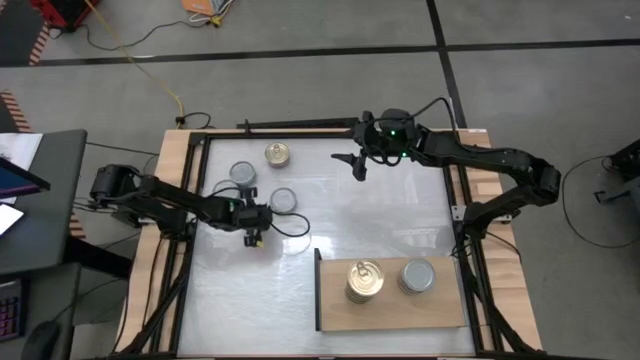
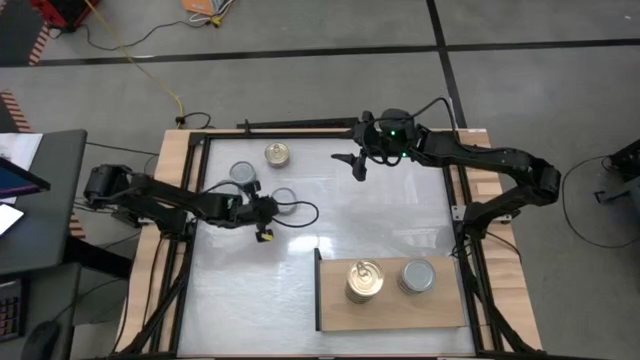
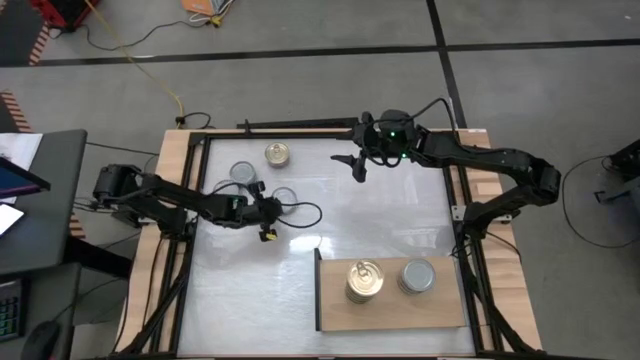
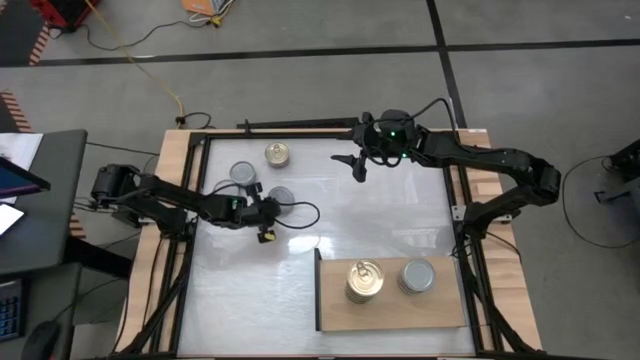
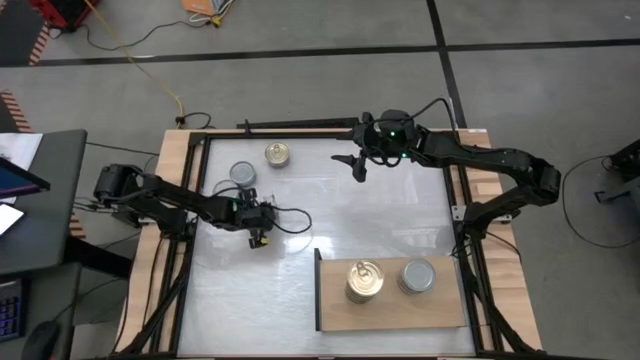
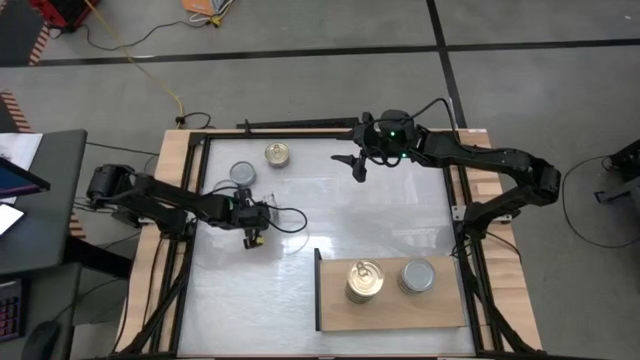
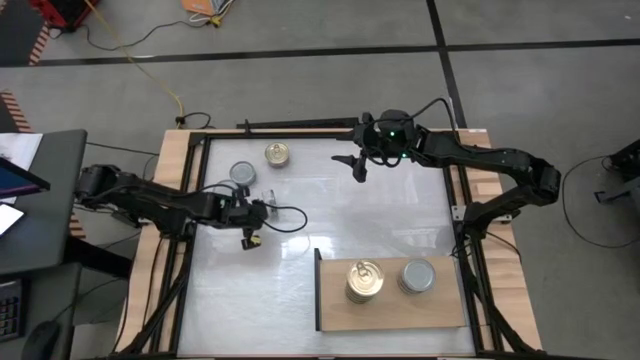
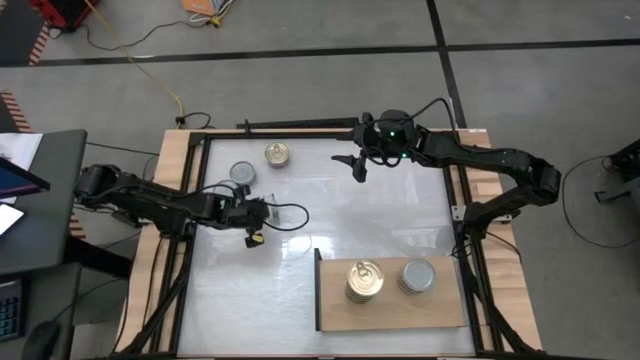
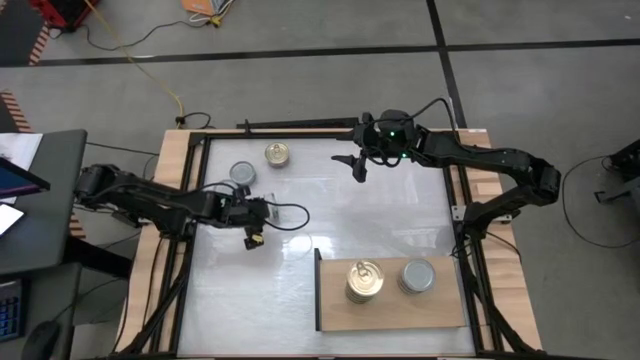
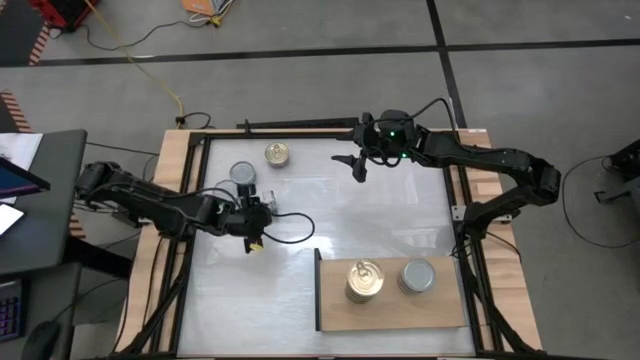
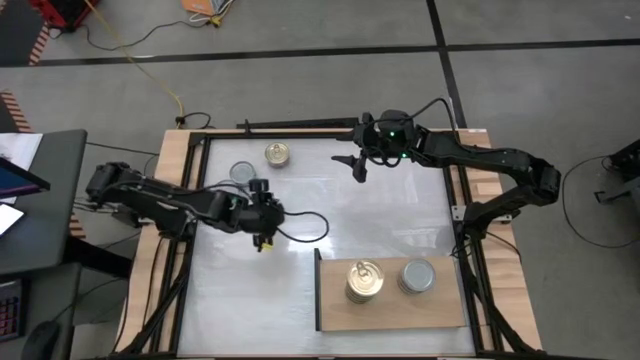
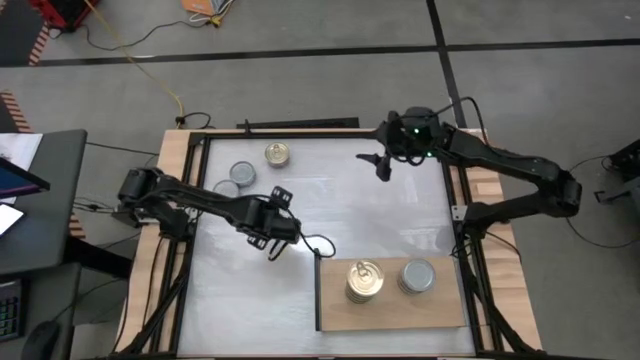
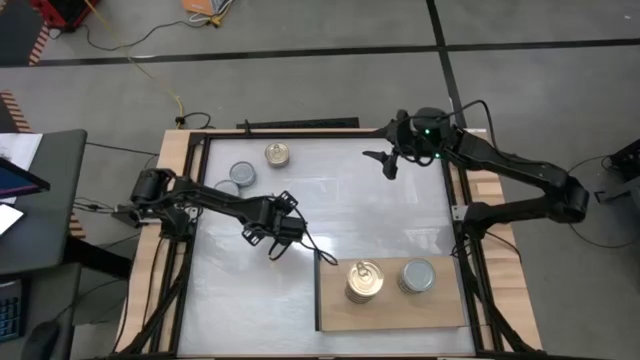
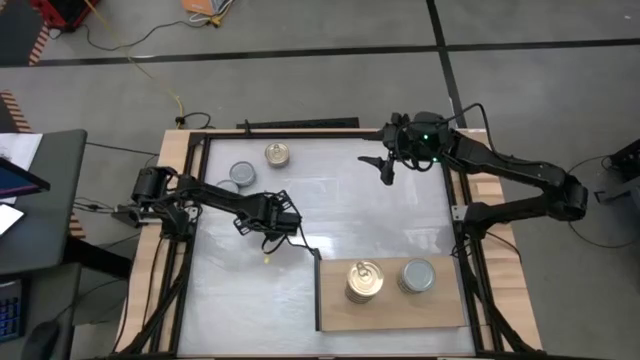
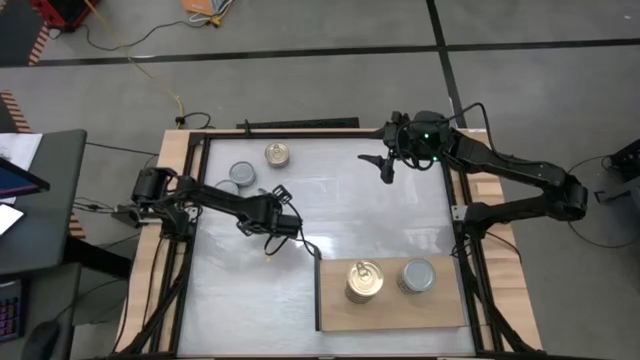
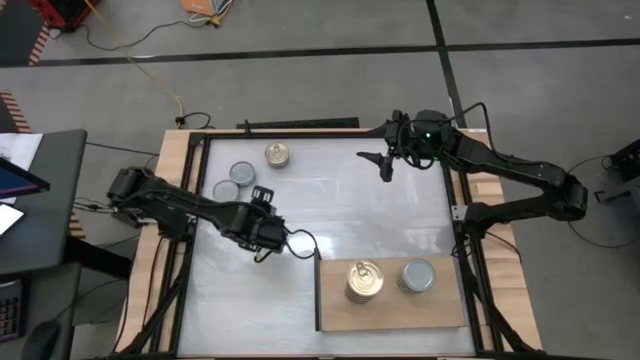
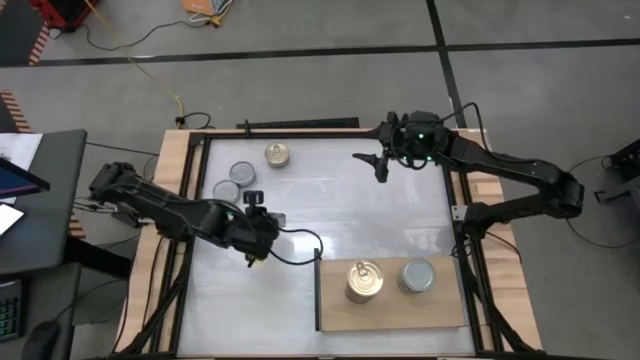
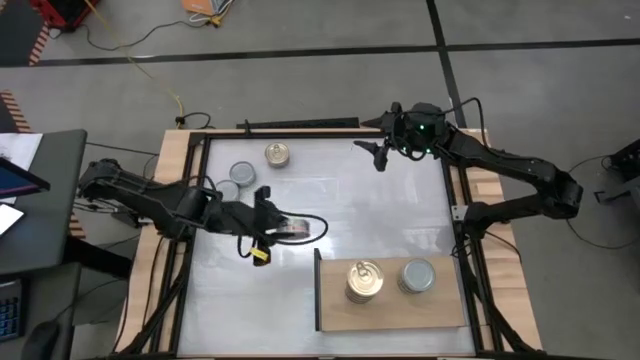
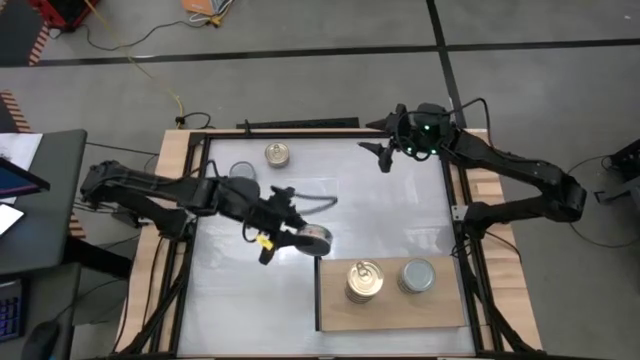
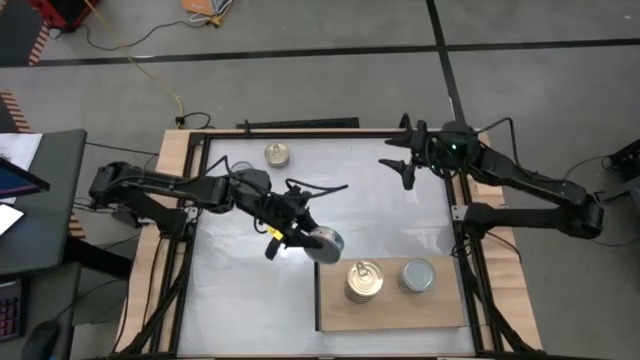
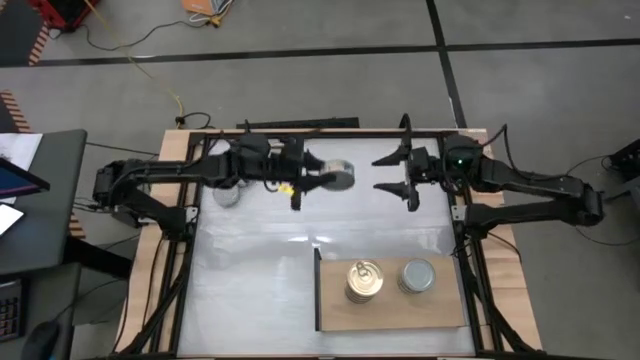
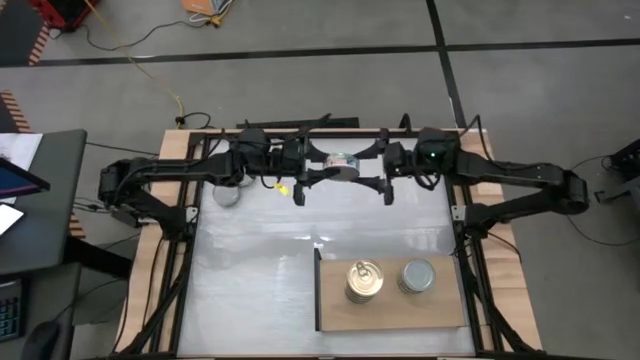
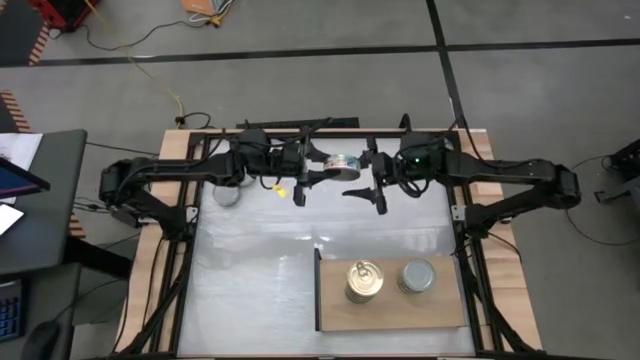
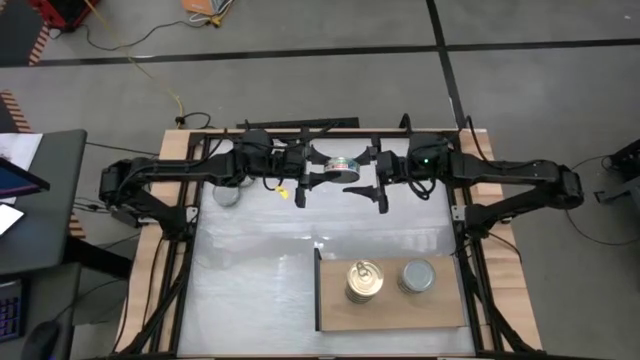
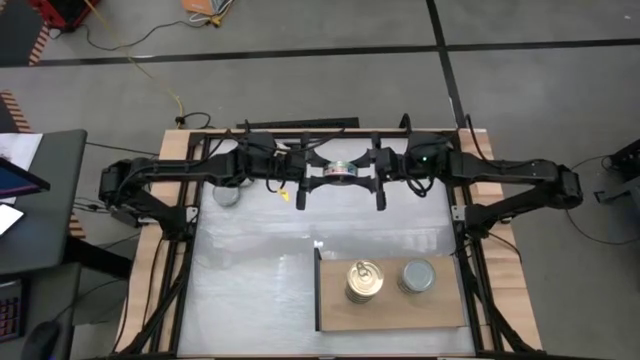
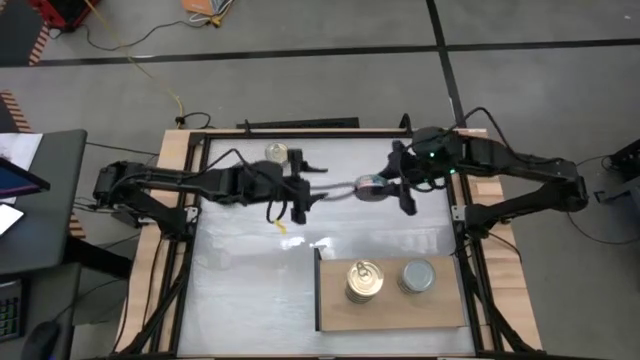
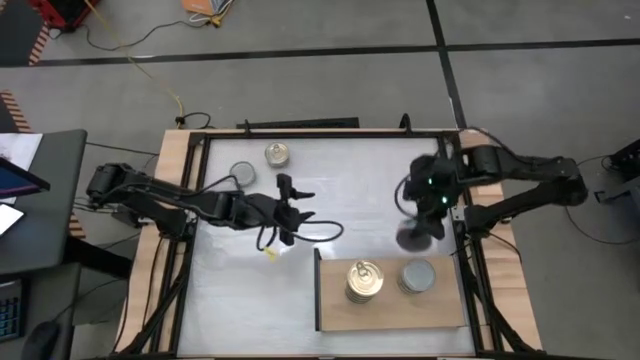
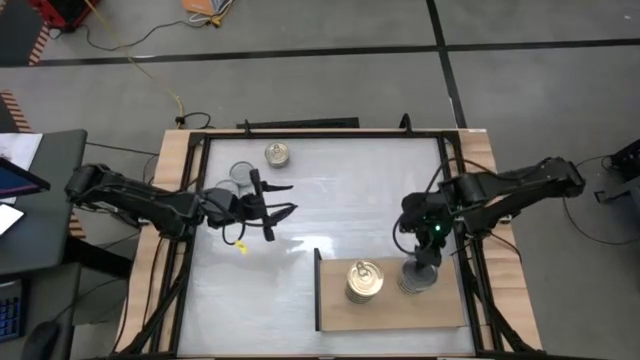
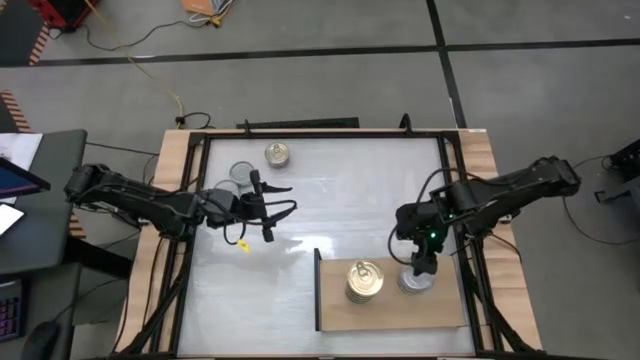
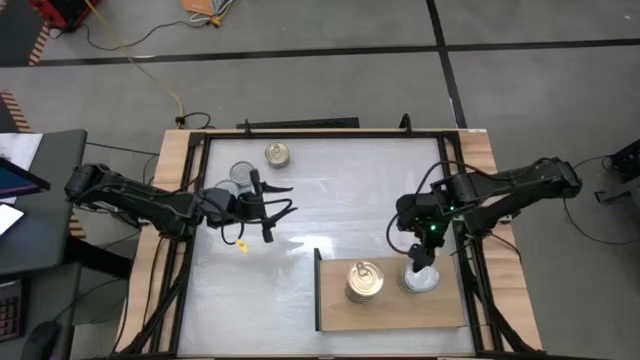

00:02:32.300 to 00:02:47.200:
Task: Stack canned seafood by type on shelf
Stack the green tuna can on top of the green tuna can on the shelf

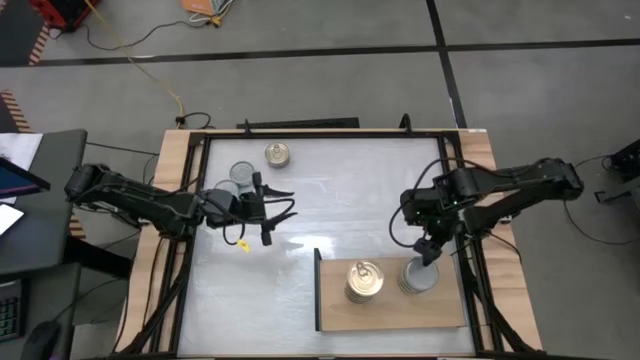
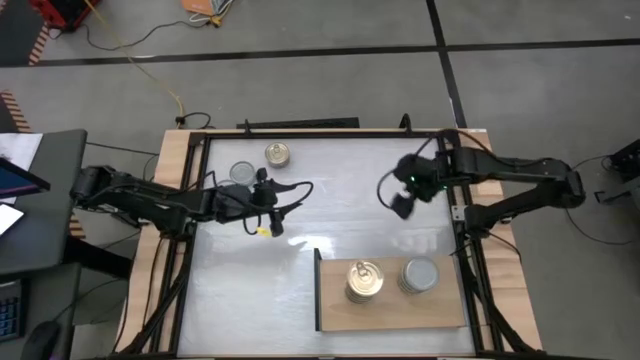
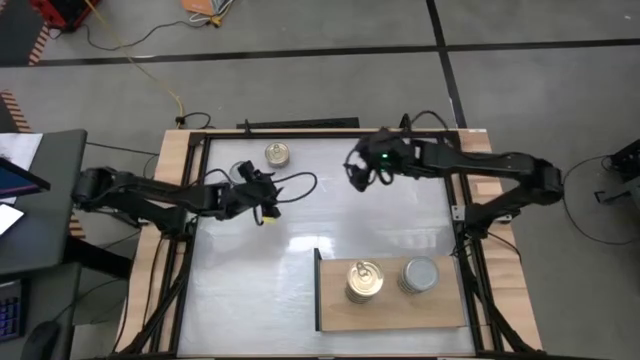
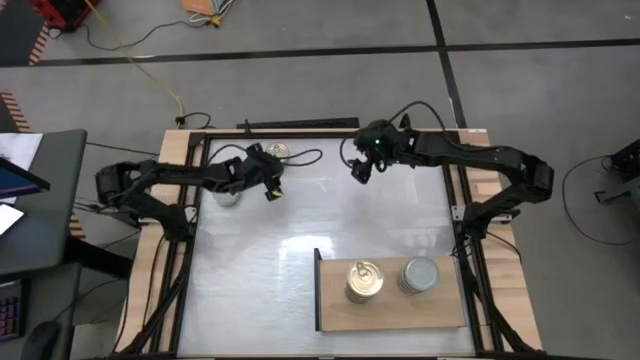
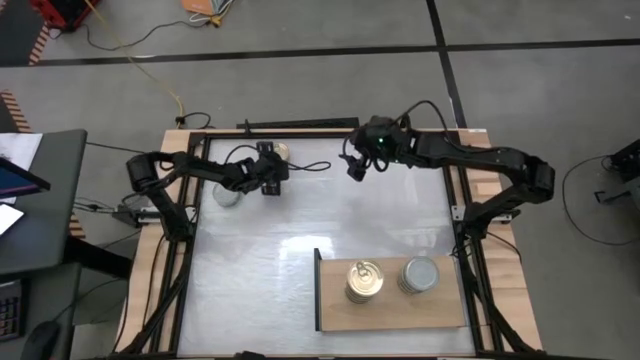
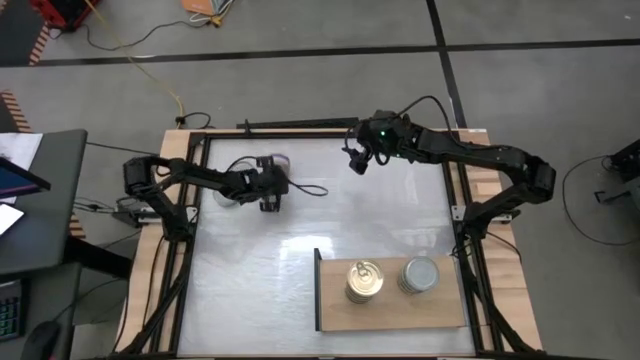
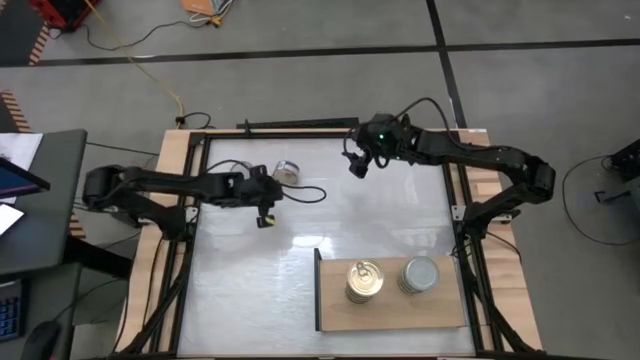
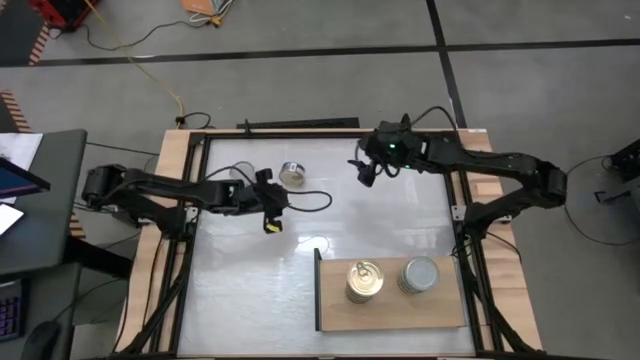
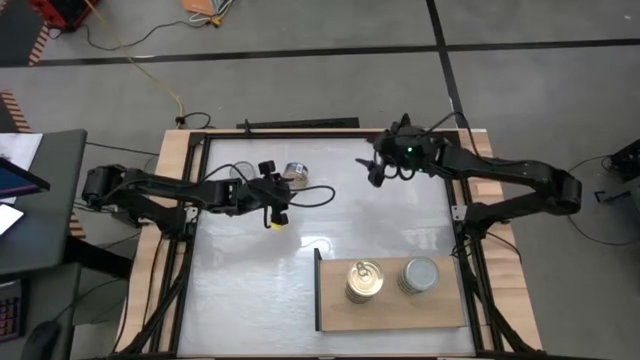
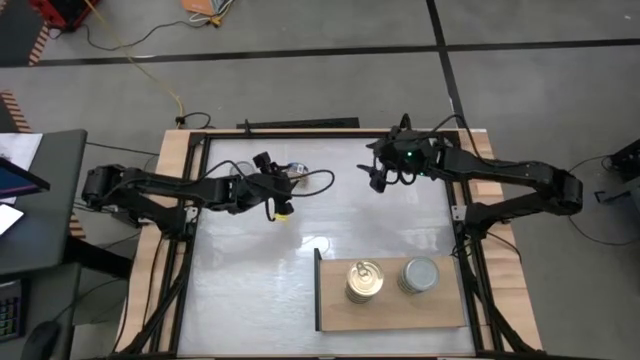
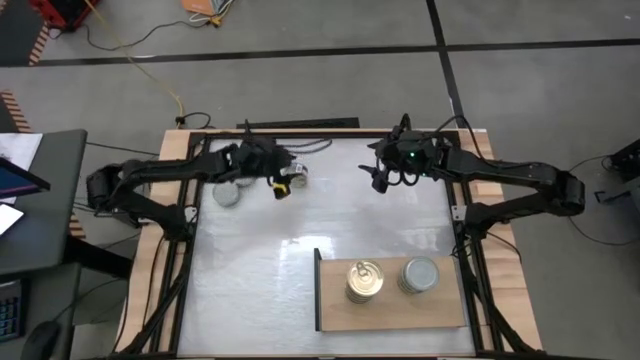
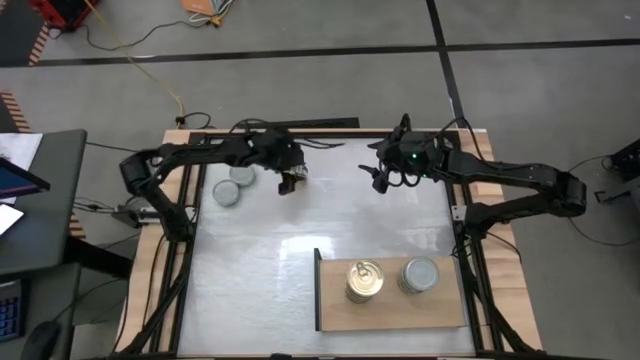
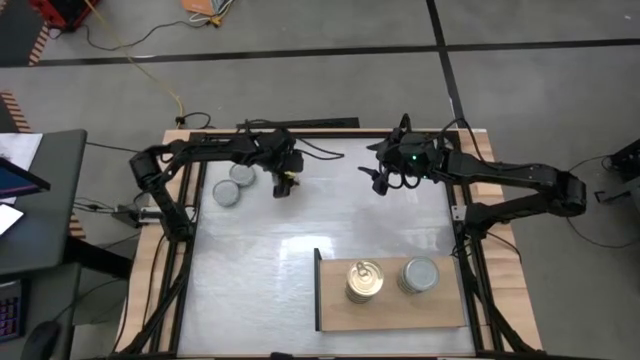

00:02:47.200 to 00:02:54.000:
Stack the blue pink tuna can on top of the blue pink tuna can on the shelf

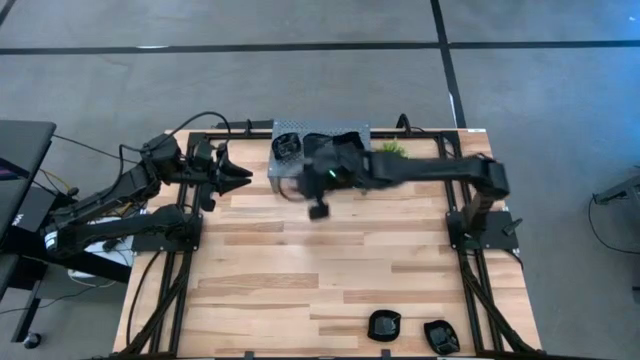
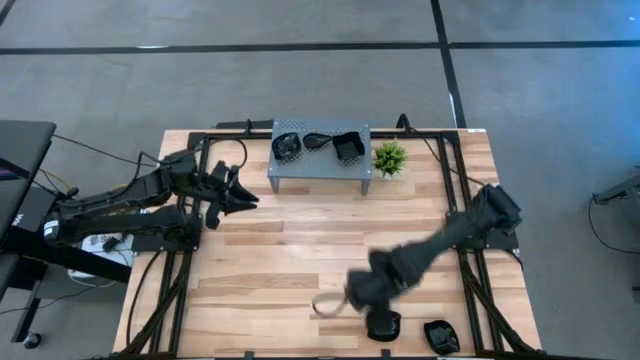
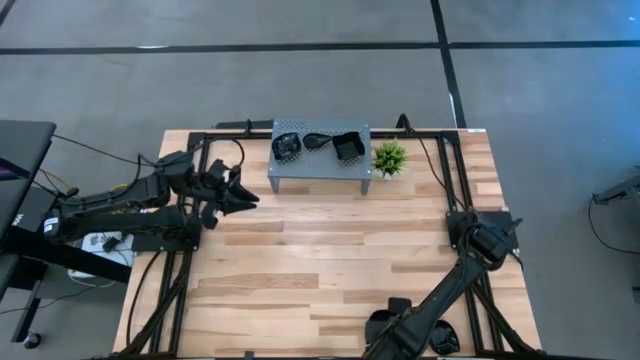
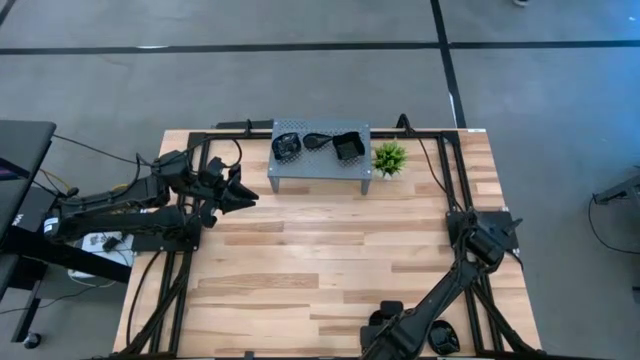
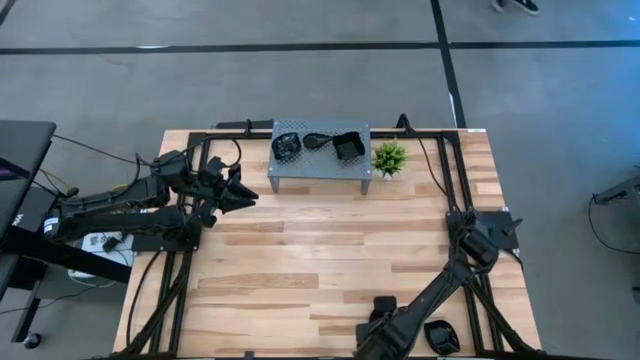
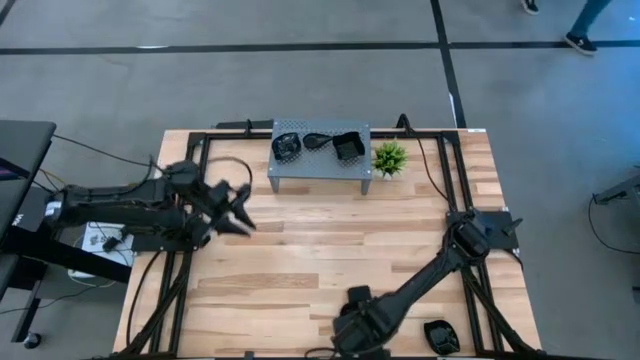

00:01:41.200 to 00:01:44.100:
Task: Pick & Place Mini shaped plates
Stack the leaf-shaped plate on top of the leaf-shaped plate on the shelf
